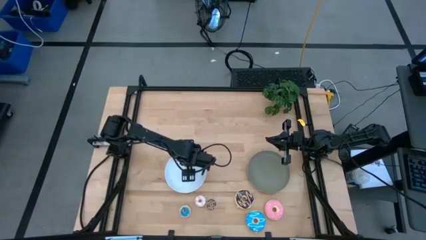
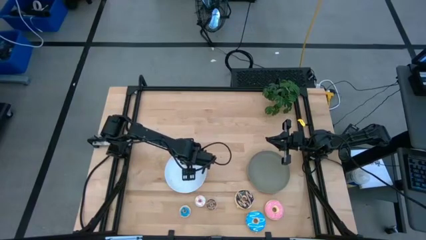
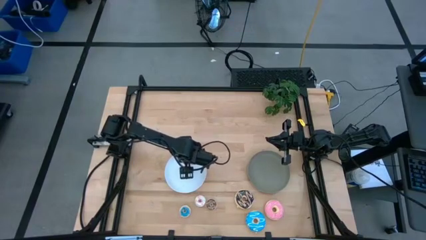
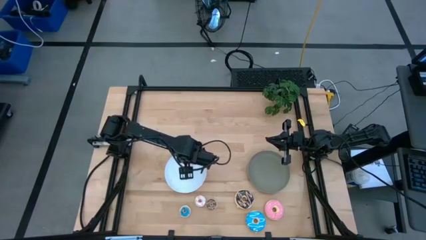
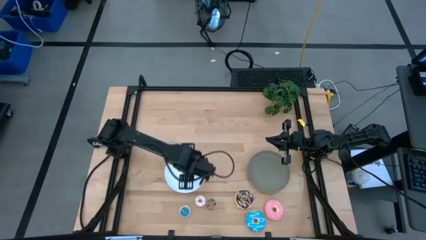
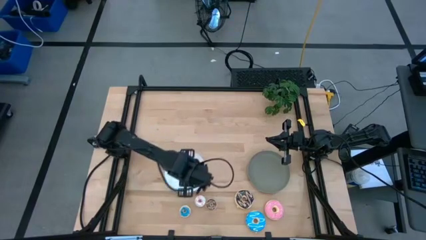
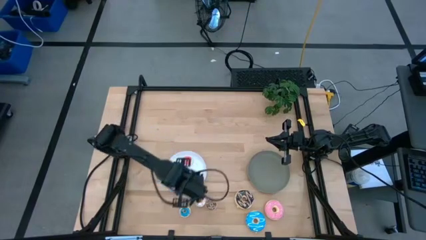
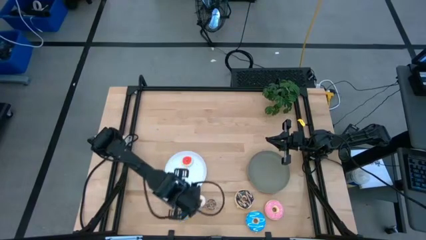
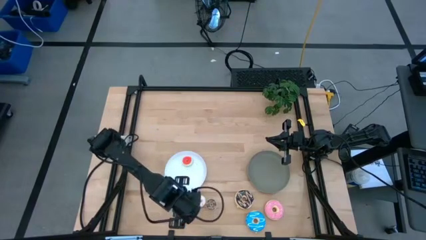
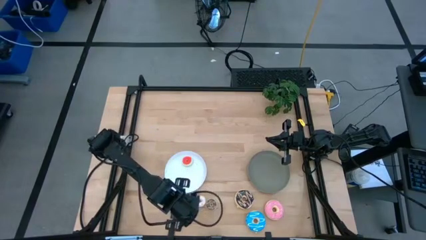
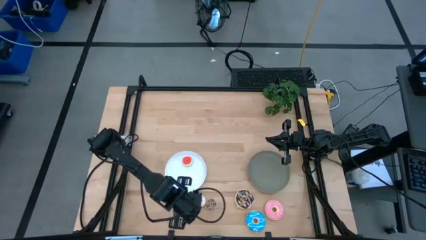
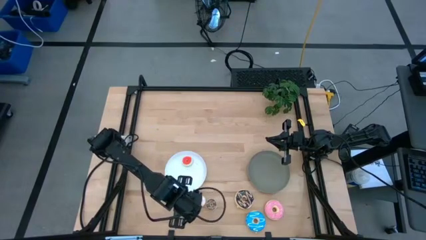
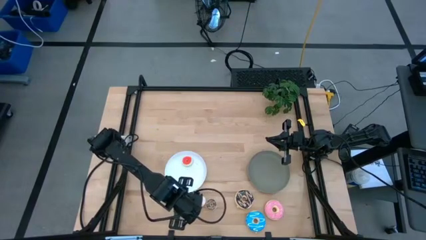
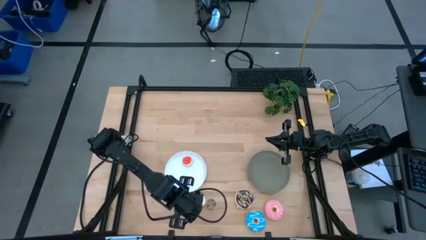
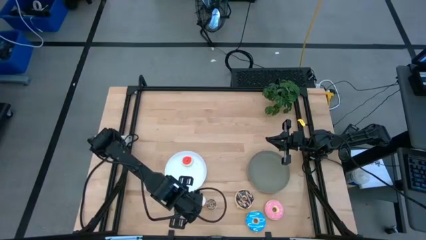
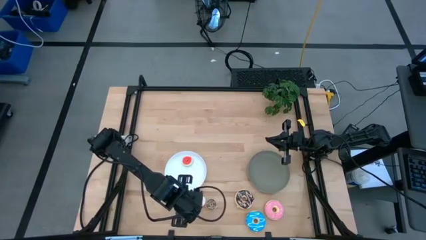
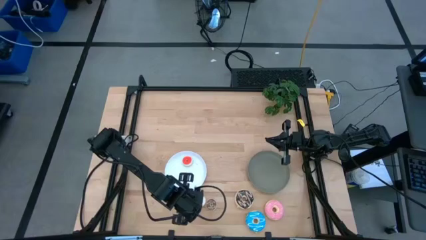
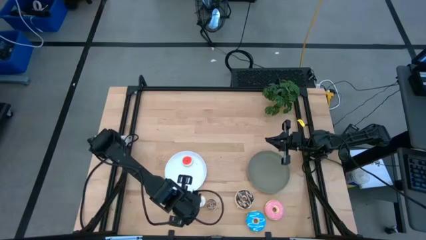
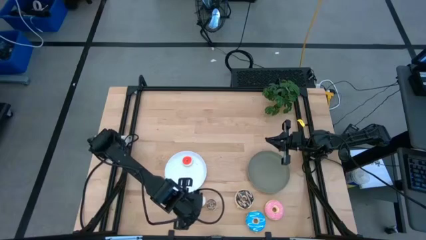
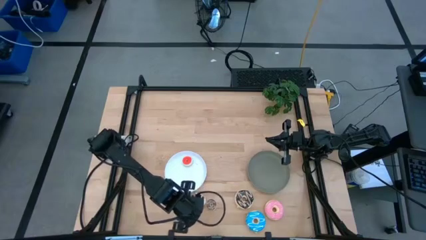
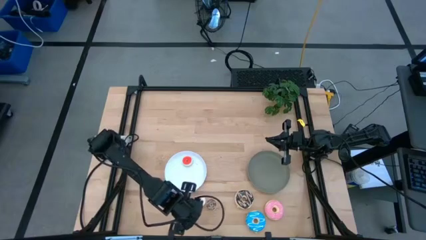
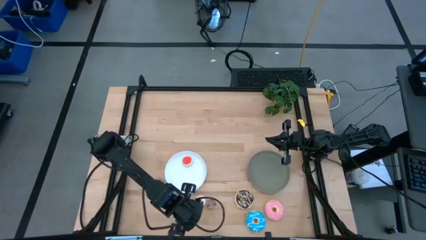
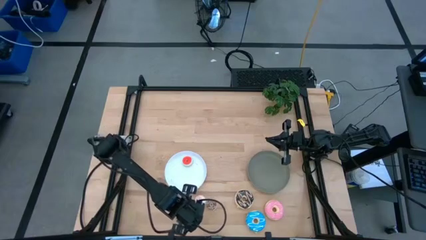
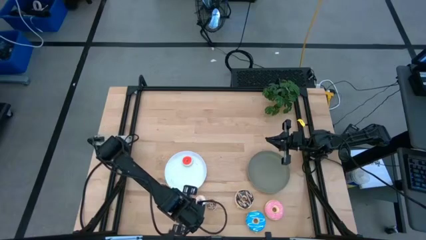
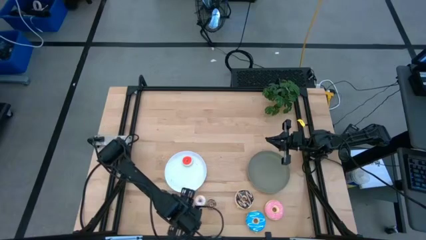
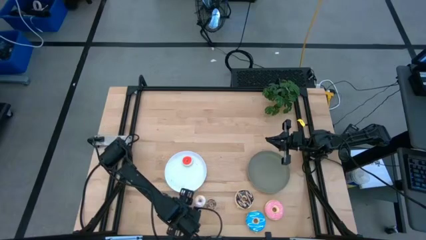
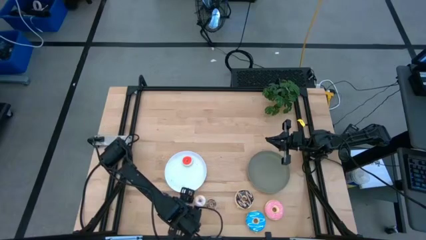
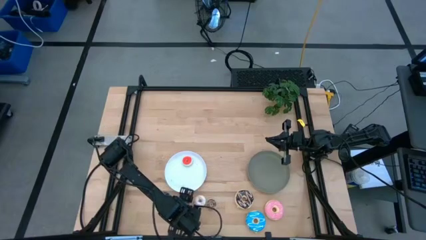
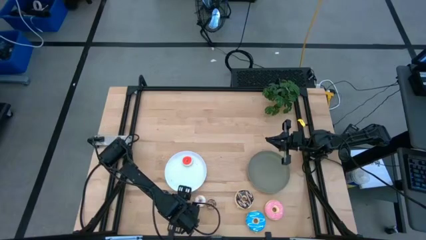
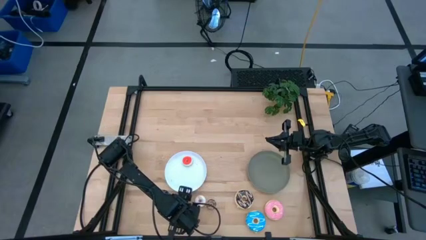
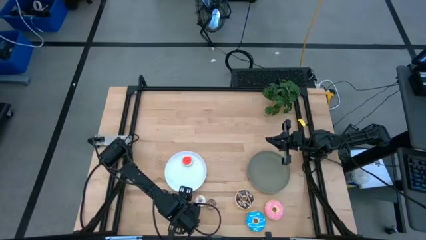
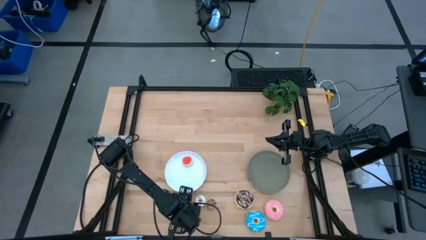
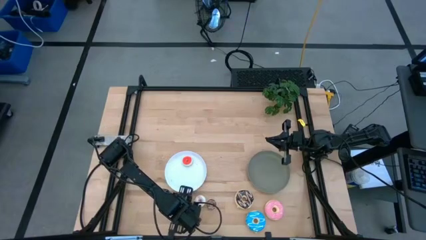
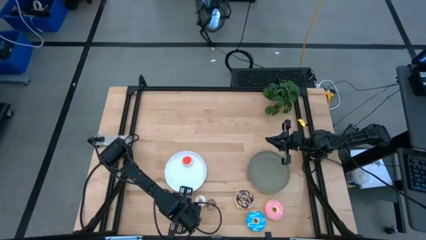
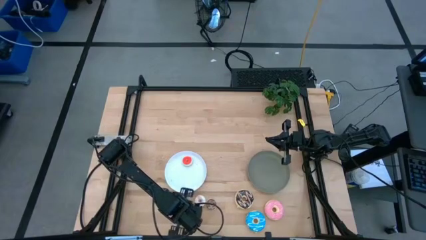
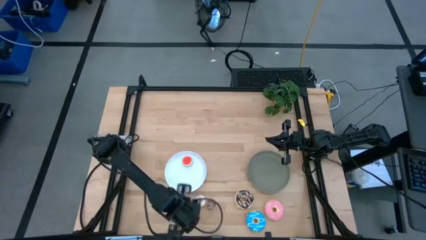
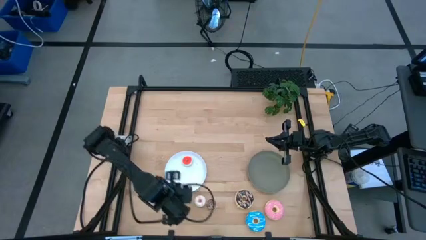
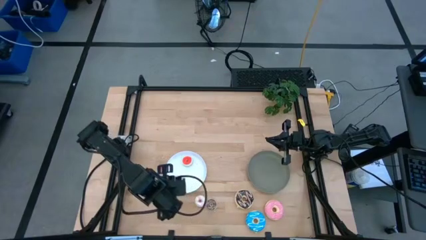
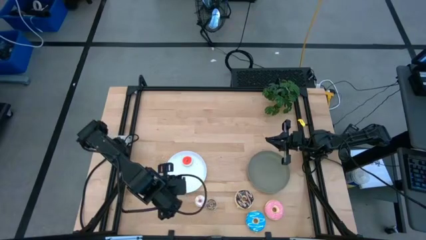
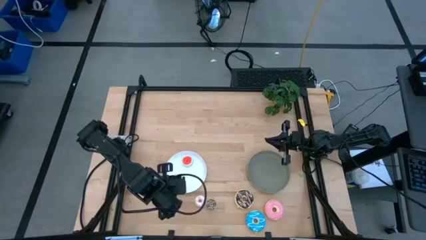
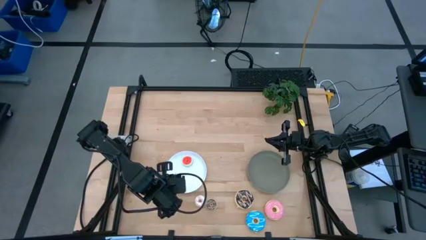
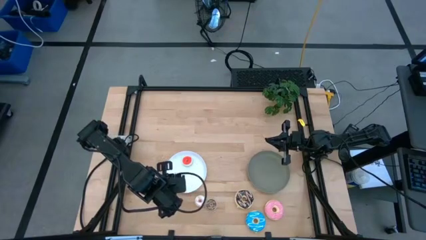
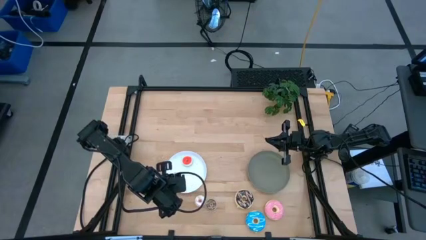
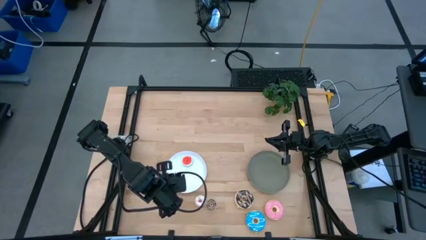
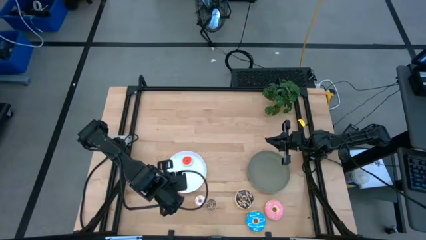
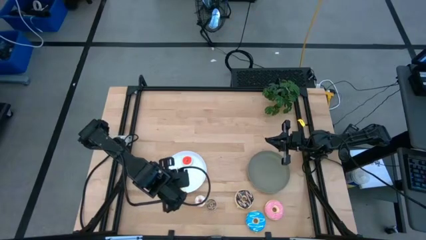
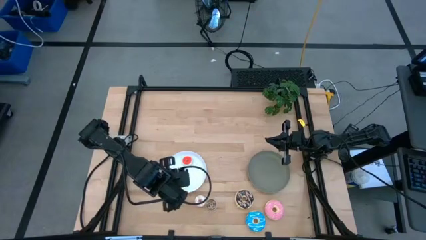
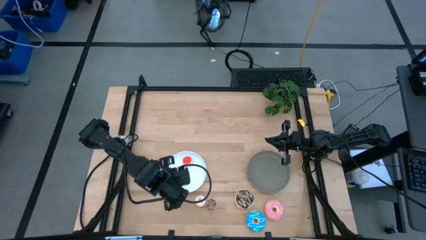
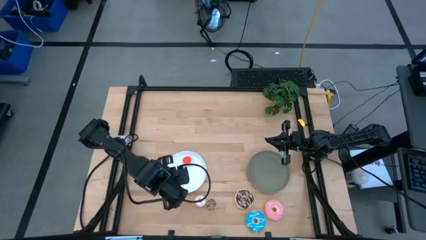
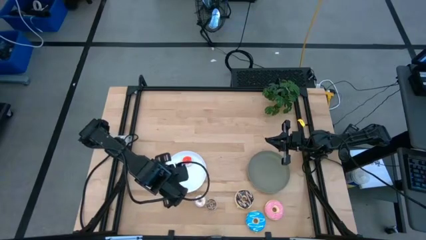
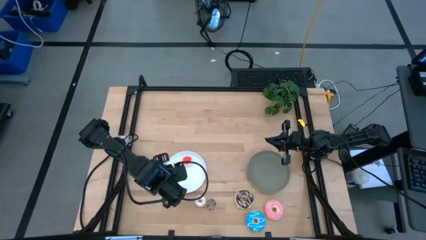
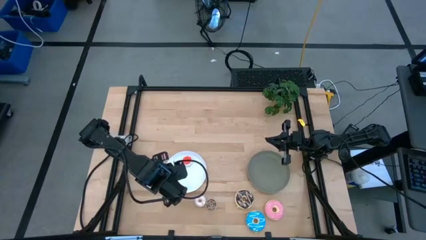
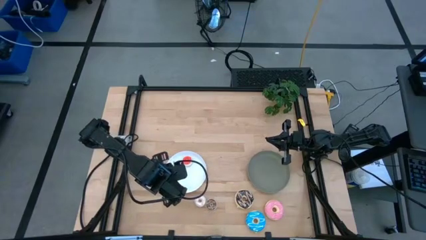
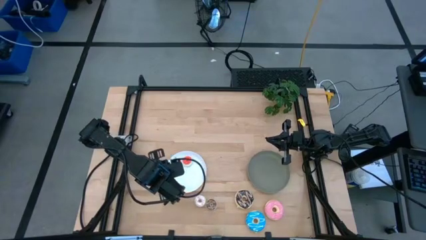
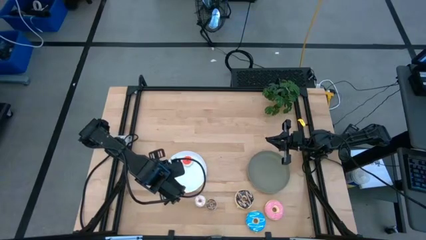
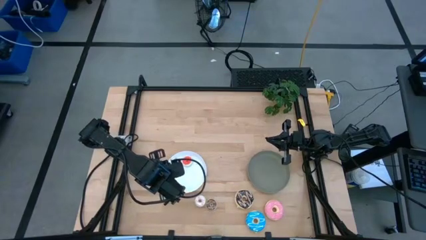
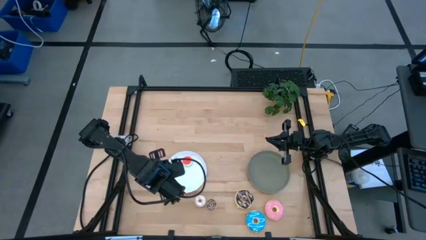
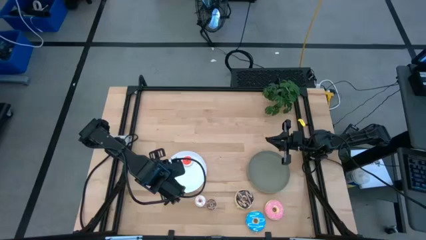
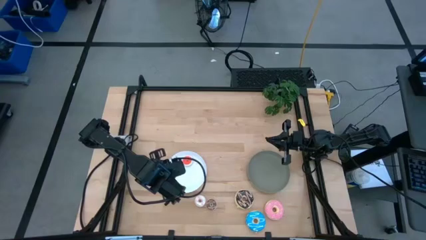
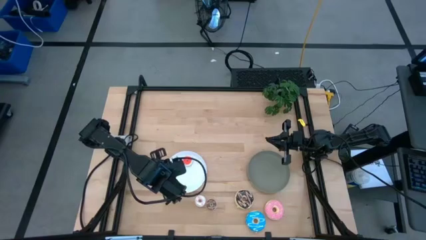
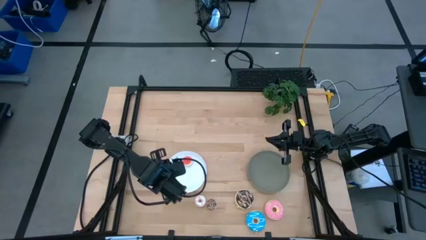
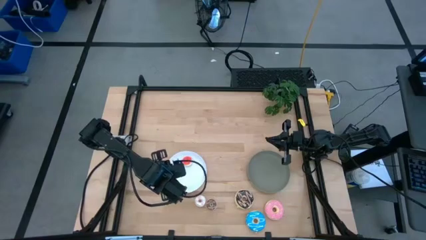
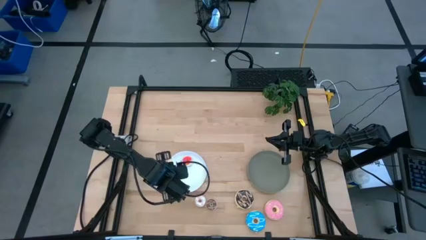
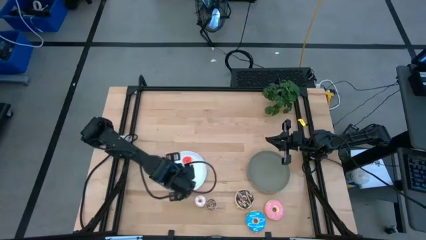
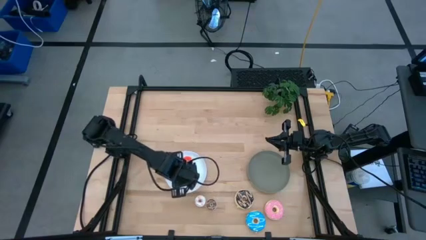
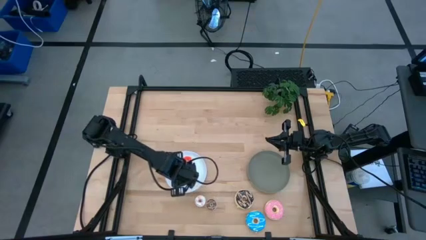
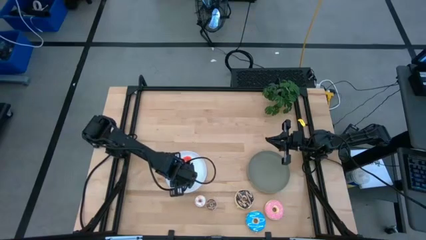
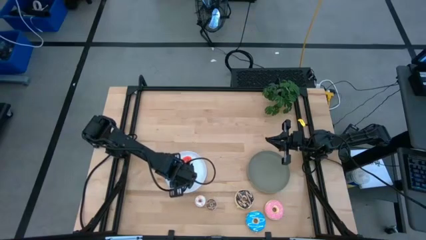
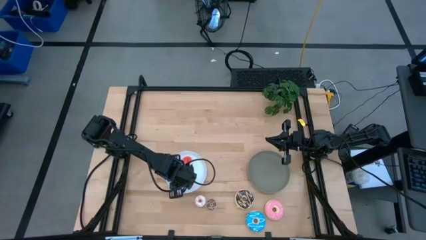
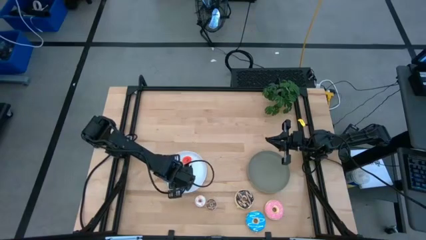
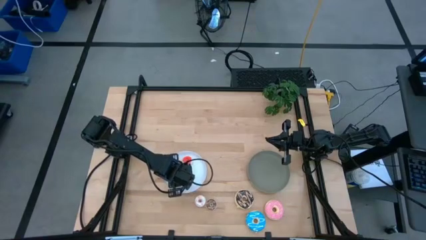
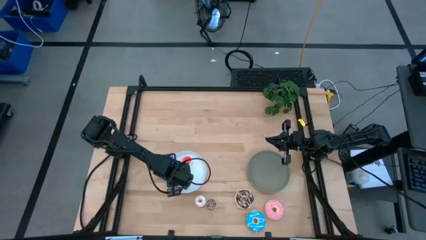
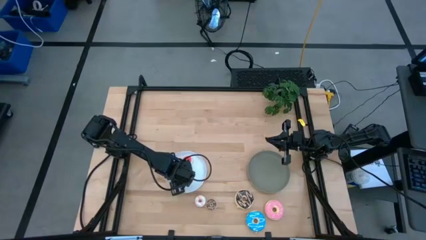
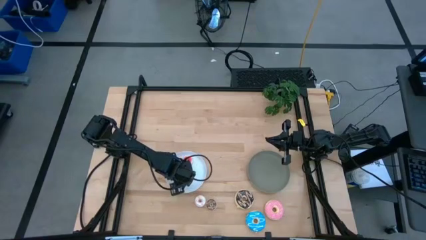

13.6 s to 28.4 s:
Task: Pick & Place donuts
Put the small blue donut on the white plate
